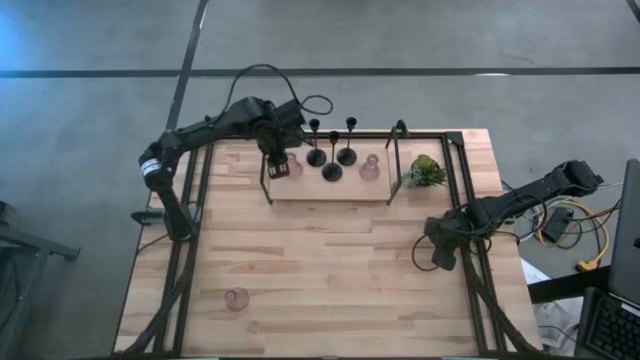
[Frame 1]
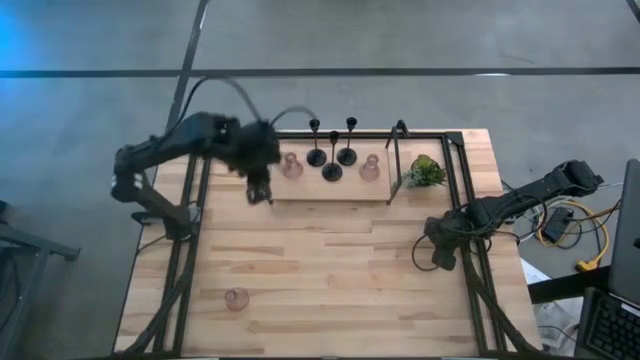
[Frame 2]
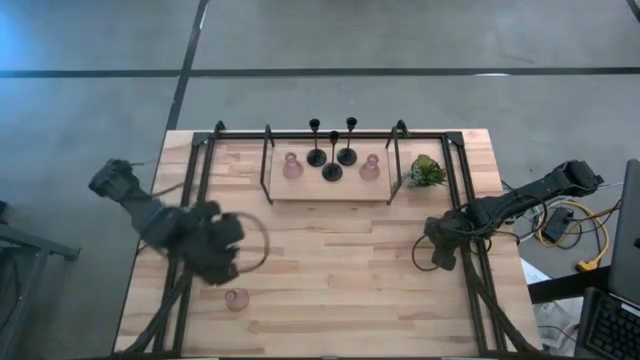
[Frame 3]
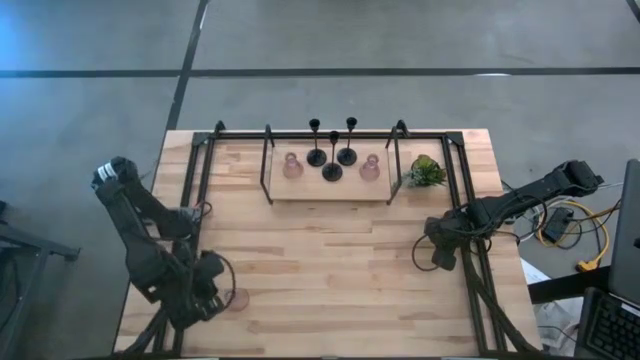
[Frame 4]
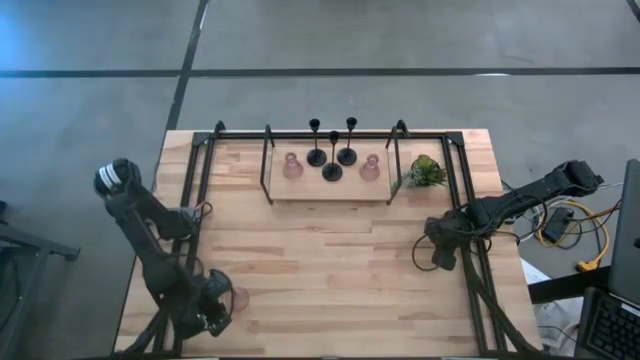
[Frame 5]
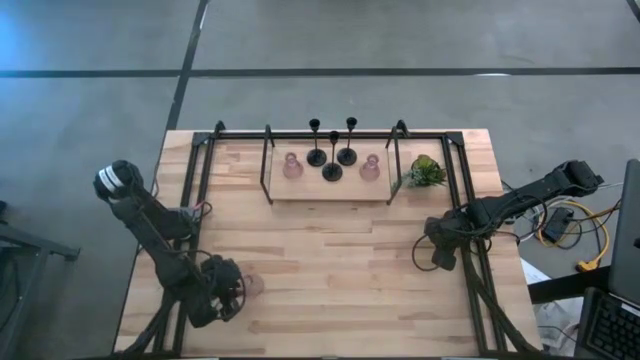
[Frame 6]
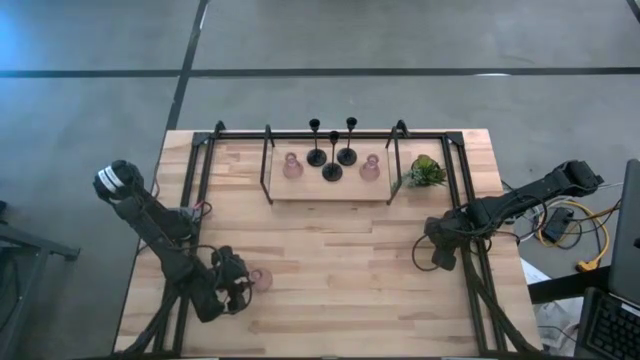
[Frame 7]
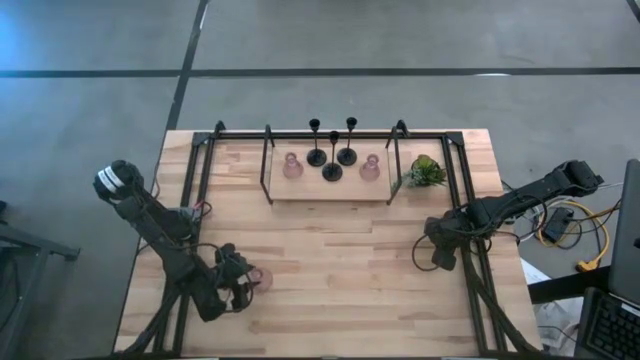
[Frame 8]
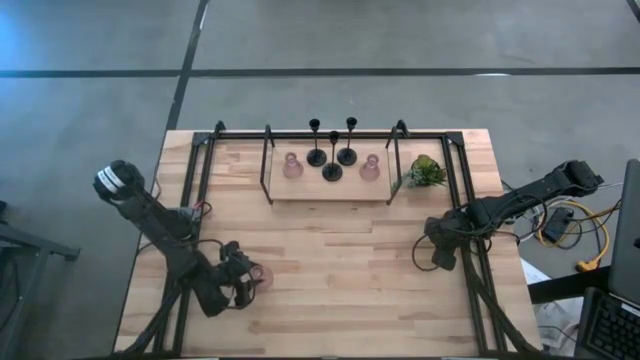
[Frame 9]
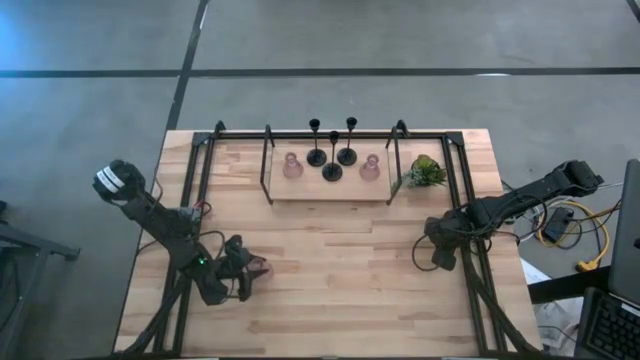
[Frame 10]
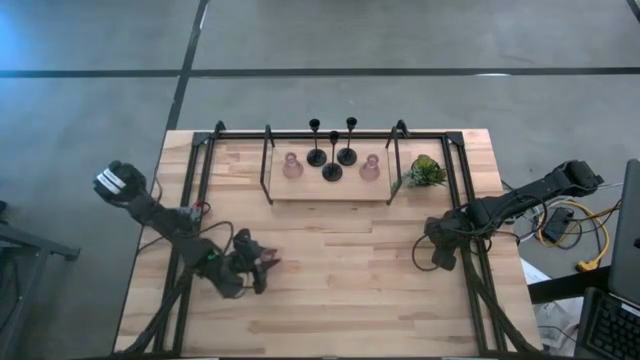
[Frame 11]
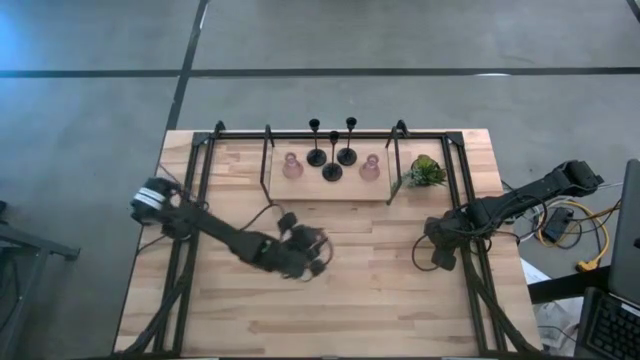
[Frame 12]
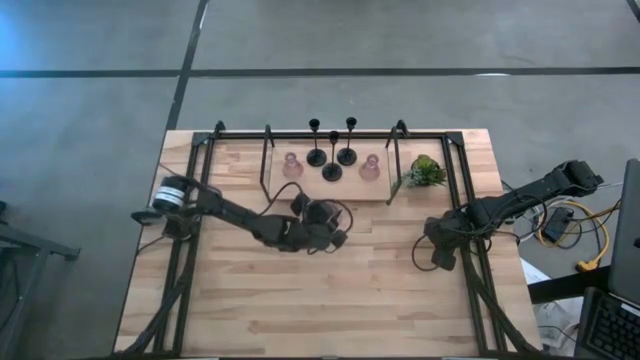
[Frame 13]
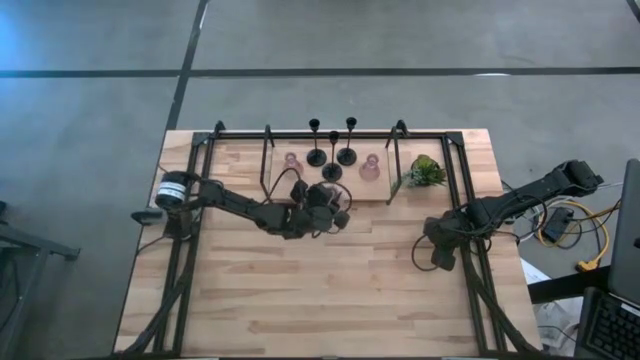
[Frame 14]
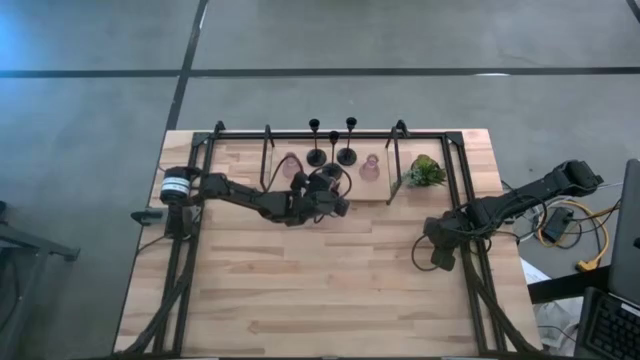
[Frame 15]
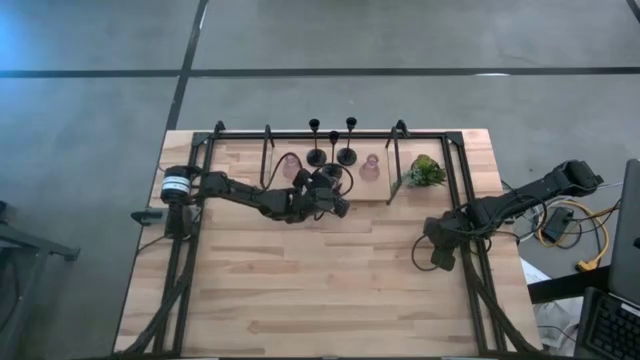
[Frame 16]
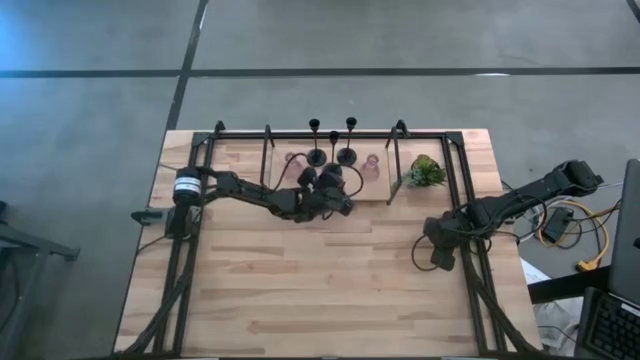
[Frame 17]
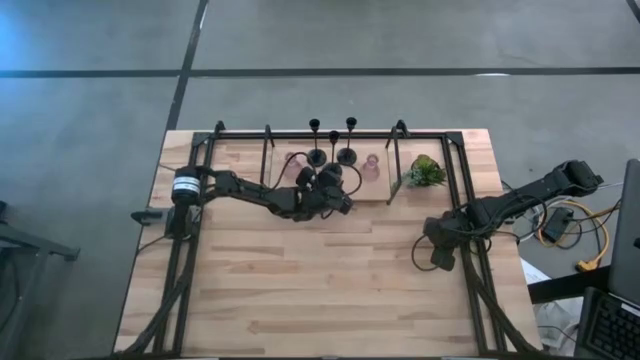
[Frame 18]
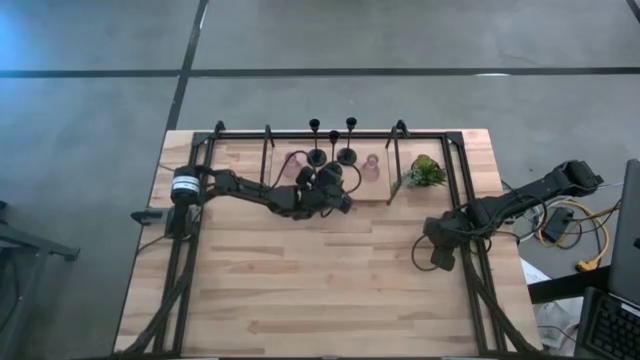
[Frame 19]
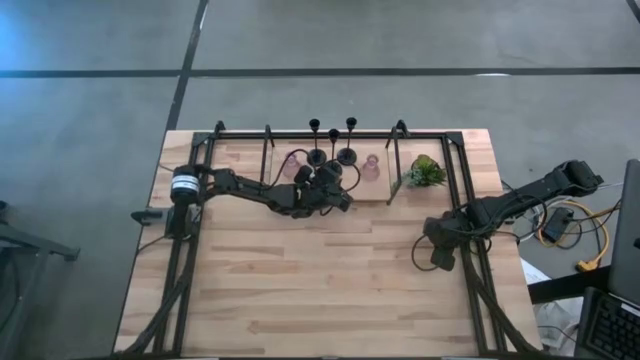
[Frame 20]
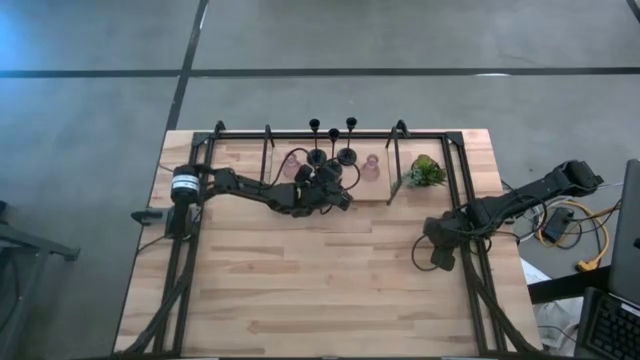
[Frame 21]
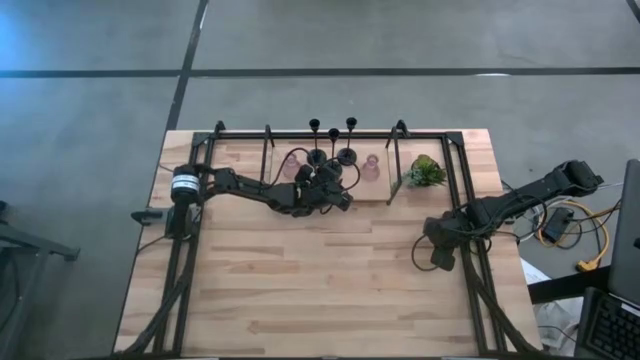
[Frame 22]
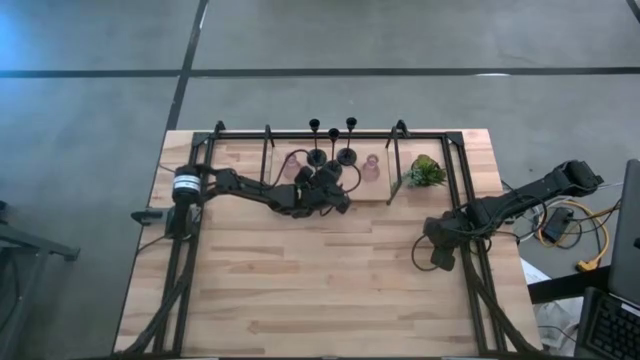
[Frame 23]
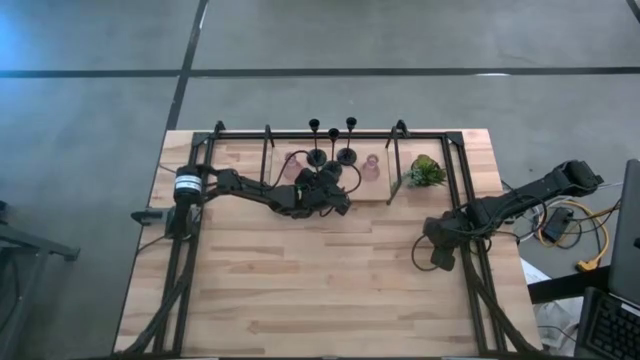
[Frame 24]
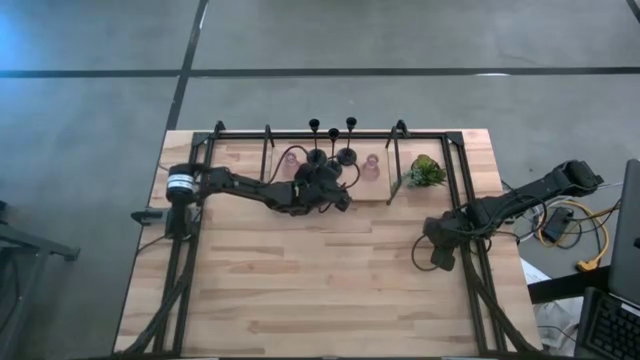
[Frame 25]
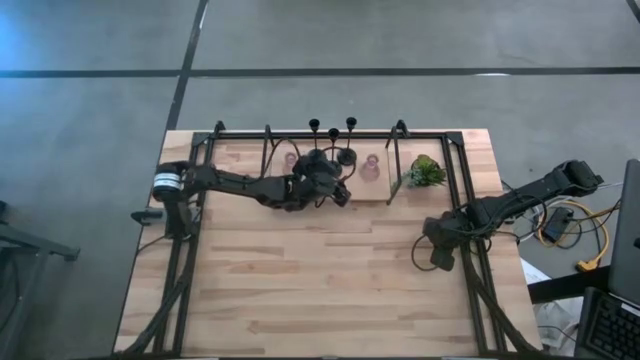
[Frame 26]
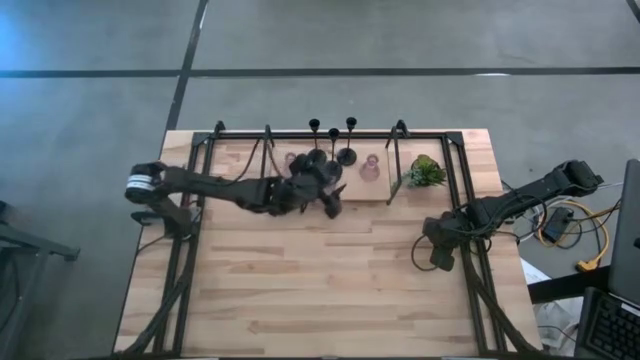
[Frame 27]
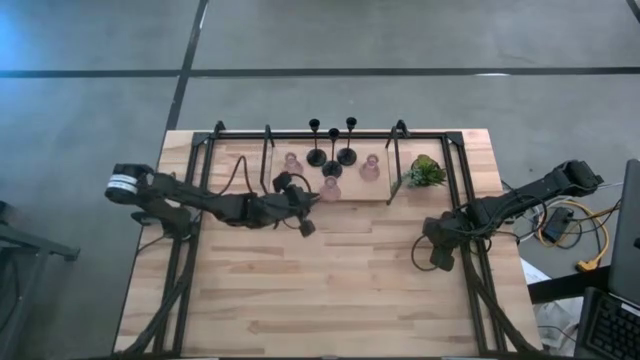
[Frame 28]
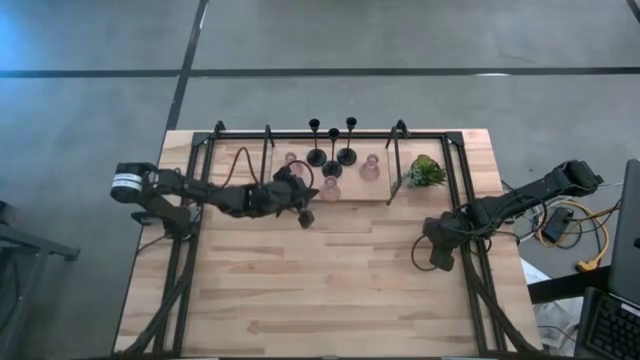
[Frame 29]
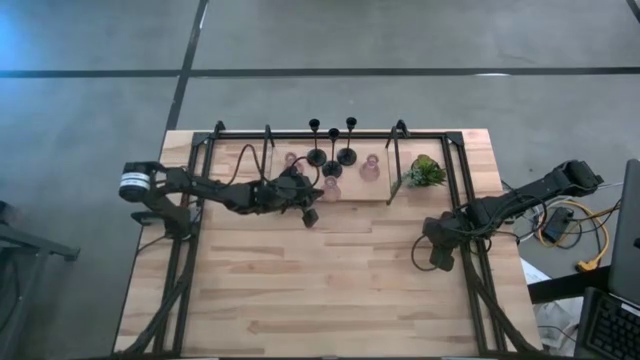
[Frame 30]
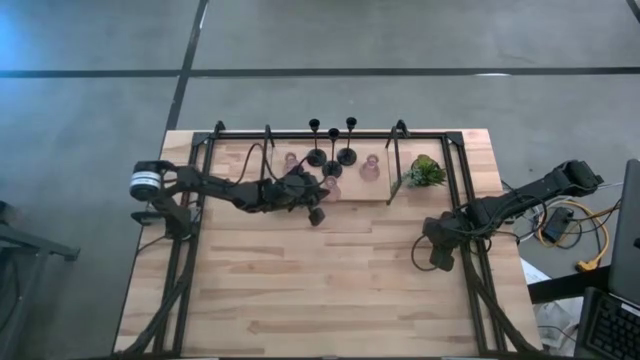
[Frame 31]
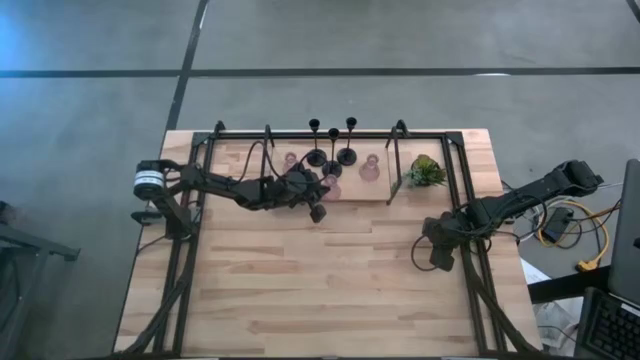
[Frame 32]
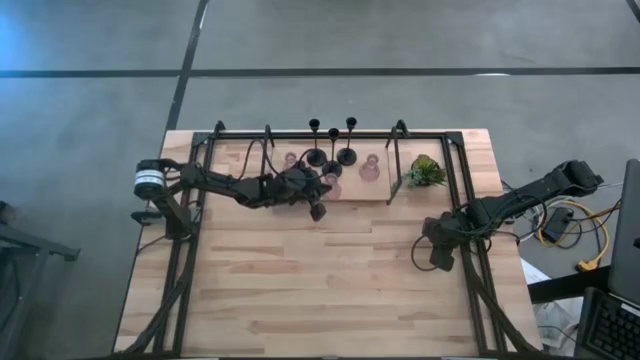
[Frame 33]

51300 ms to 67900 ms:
Task: Pick & Place candle stick holders
Put the purple glass candle holder on the shelf

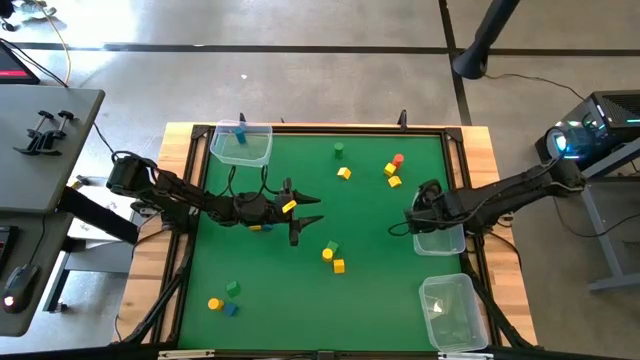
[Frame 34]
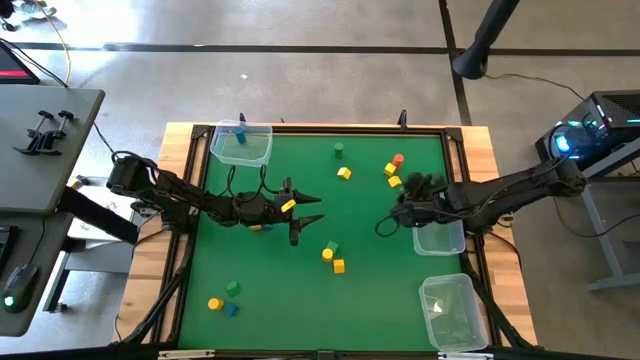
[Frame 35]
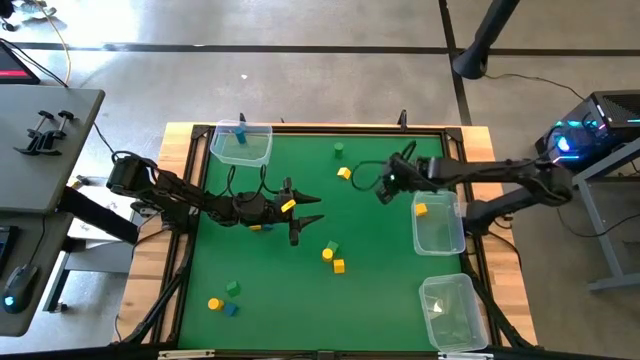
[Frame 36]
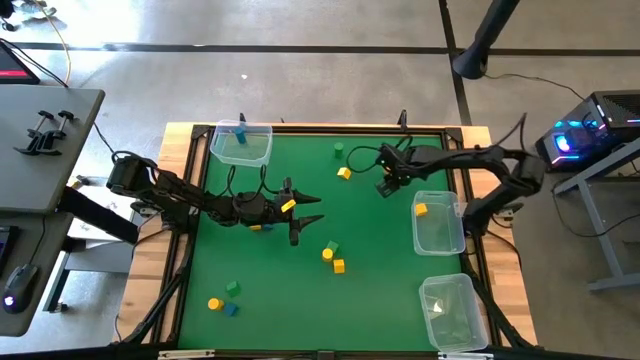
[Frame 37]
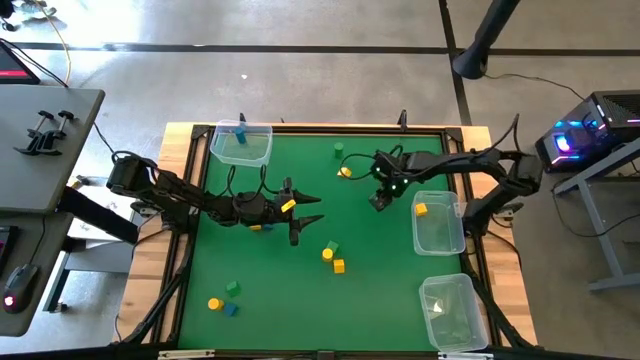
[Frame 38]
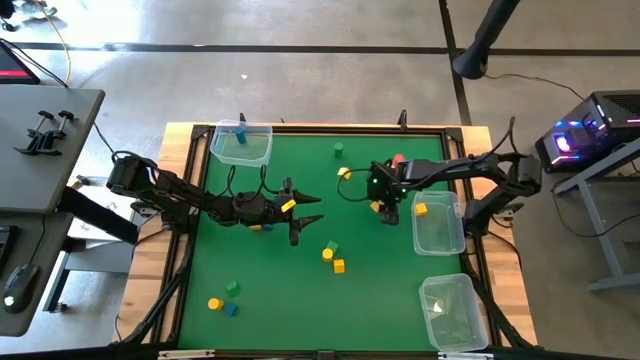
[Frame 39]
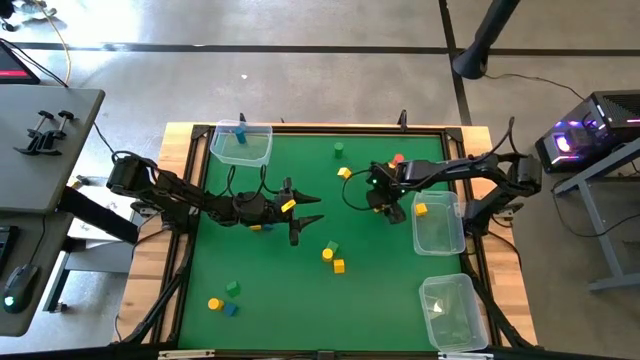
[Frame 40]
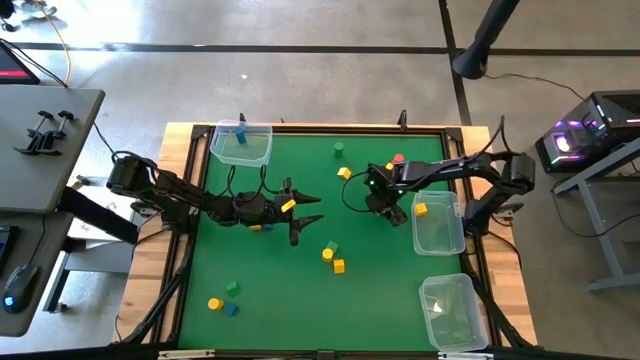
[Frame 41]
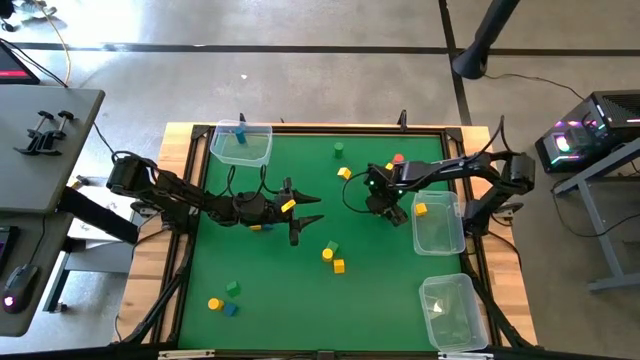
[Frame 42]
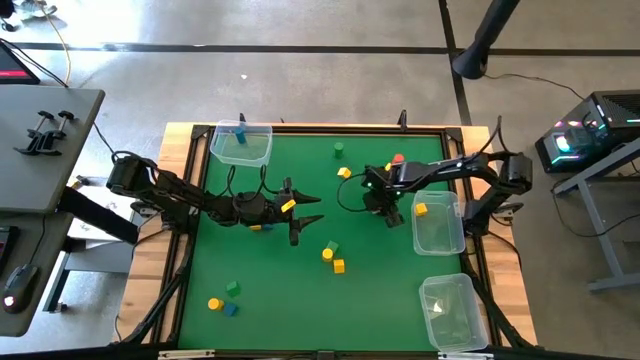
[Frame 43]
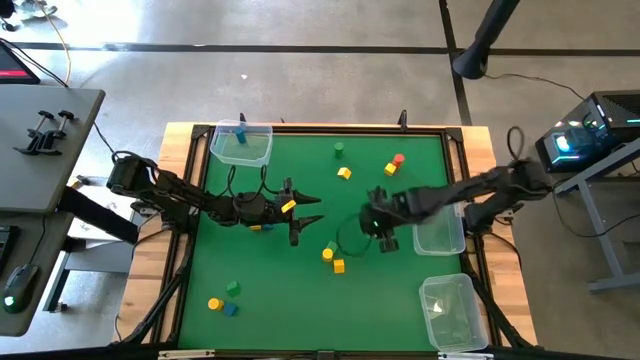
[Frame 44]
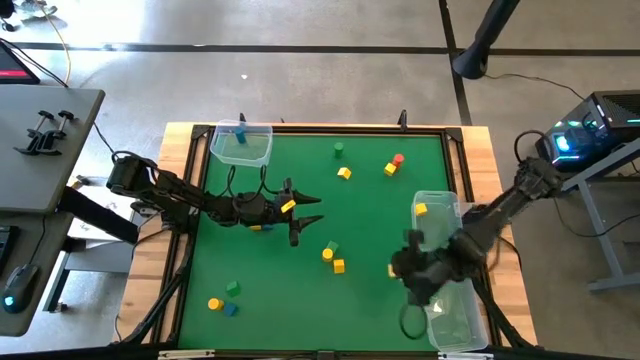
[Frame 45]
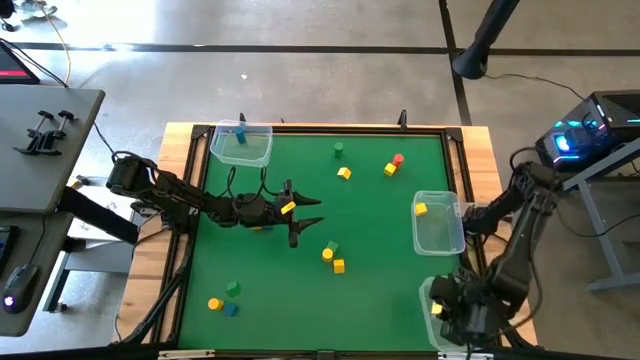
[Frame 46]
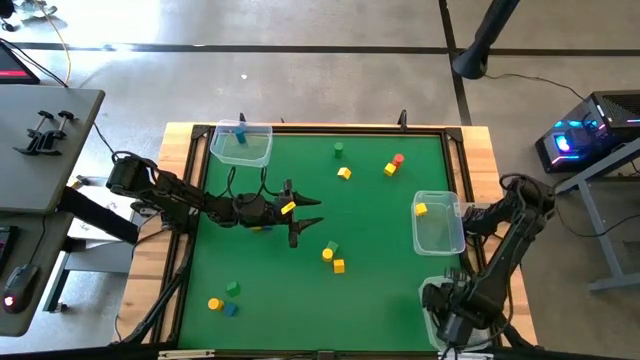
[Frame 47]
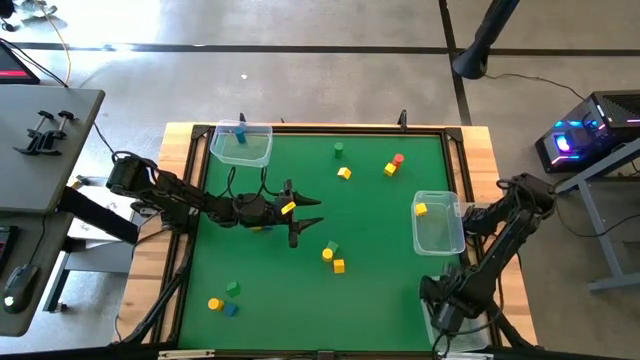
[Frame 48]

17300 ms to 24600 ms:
Task: Sort blocks by size
Put the middle yellow triangular block into the bottom transparent bin
